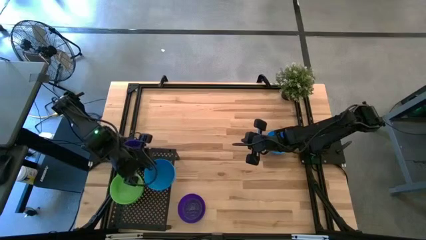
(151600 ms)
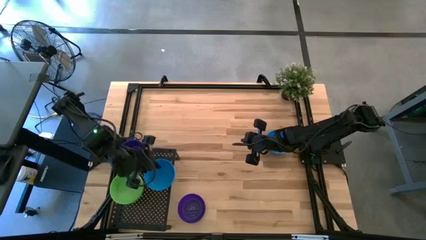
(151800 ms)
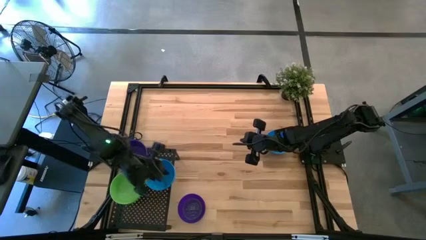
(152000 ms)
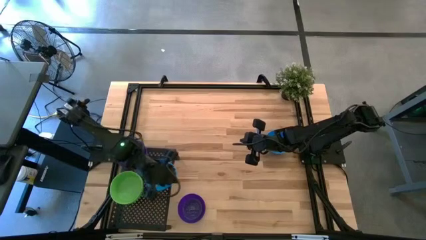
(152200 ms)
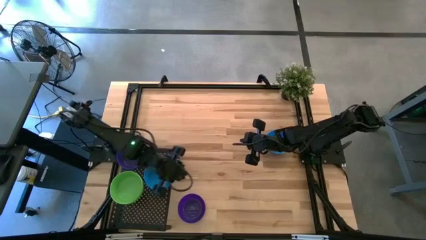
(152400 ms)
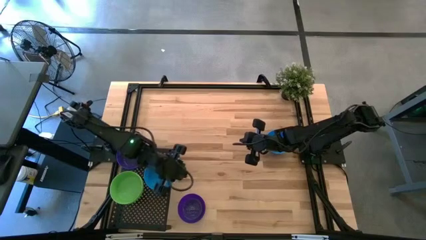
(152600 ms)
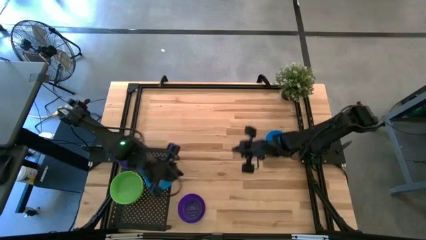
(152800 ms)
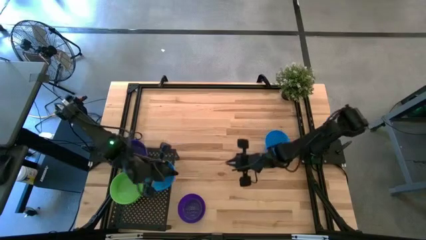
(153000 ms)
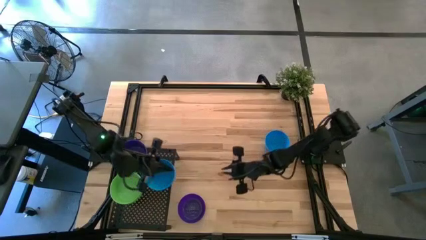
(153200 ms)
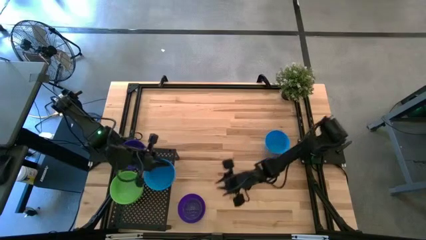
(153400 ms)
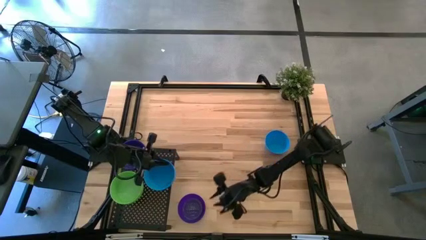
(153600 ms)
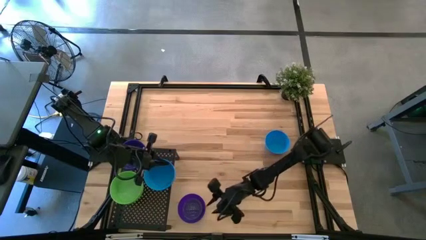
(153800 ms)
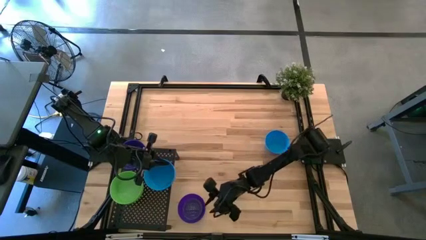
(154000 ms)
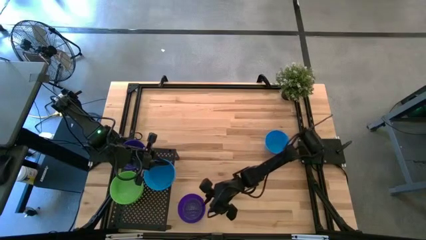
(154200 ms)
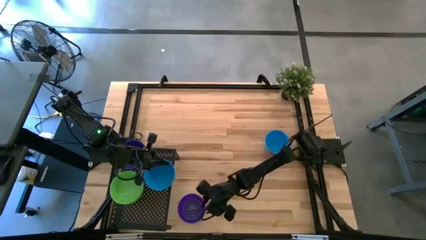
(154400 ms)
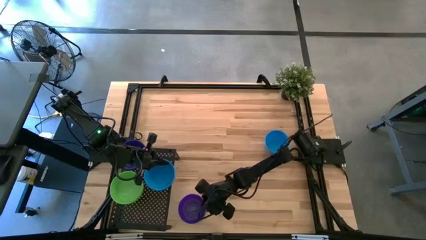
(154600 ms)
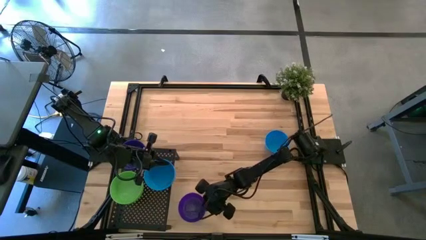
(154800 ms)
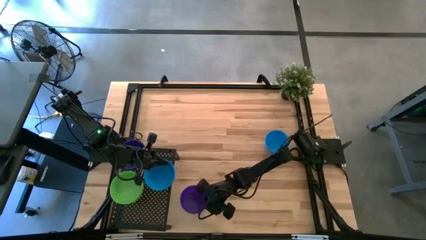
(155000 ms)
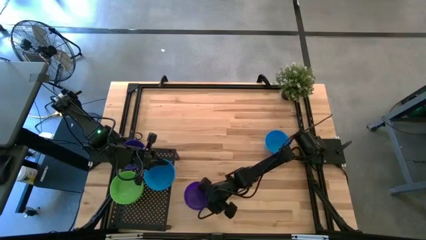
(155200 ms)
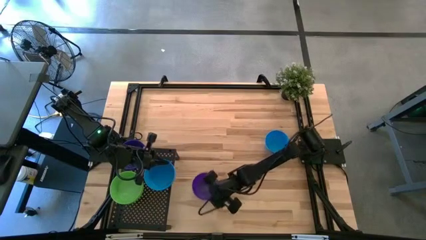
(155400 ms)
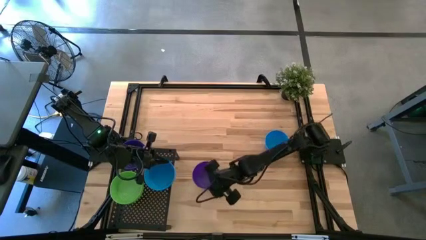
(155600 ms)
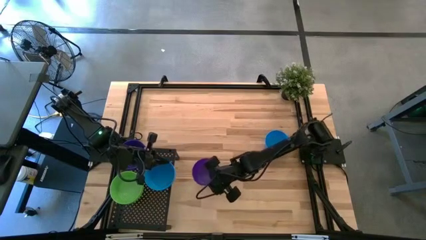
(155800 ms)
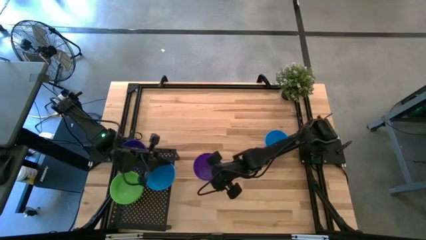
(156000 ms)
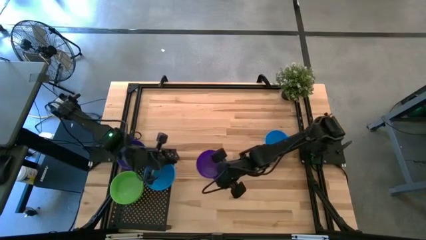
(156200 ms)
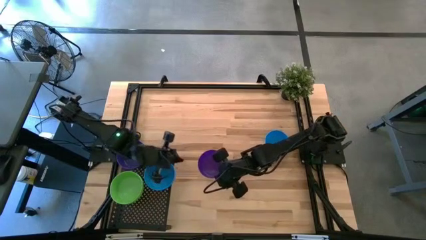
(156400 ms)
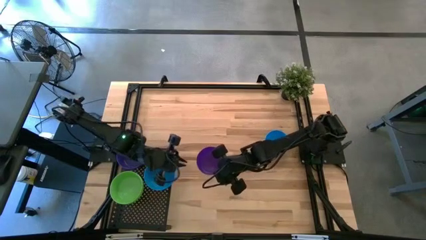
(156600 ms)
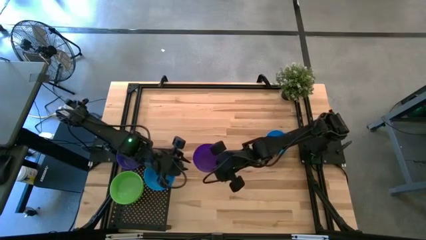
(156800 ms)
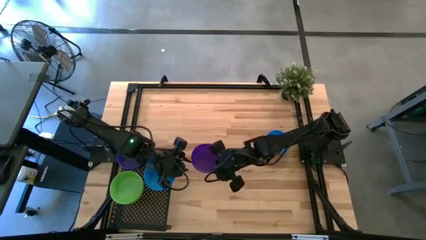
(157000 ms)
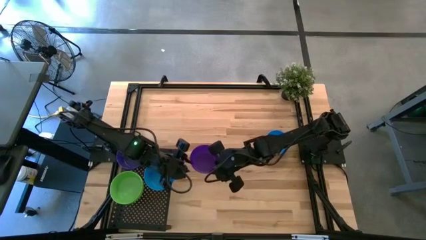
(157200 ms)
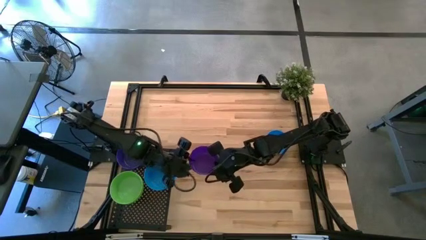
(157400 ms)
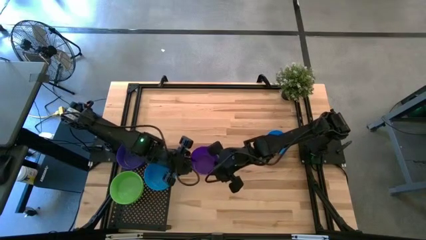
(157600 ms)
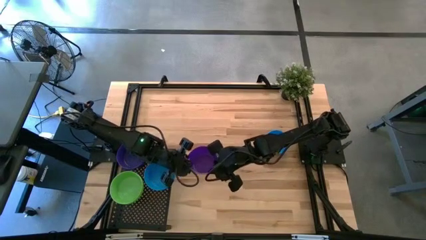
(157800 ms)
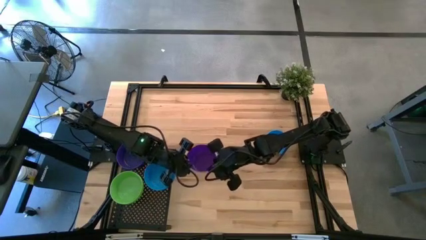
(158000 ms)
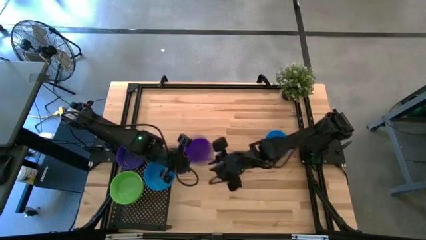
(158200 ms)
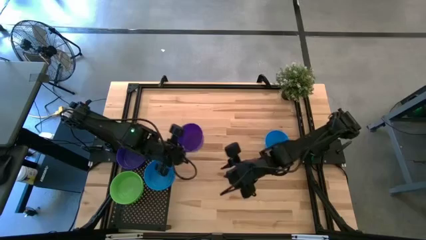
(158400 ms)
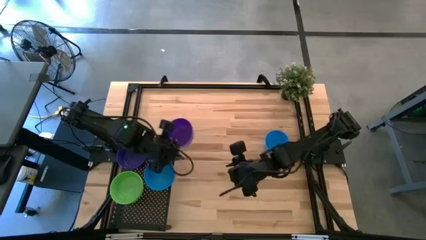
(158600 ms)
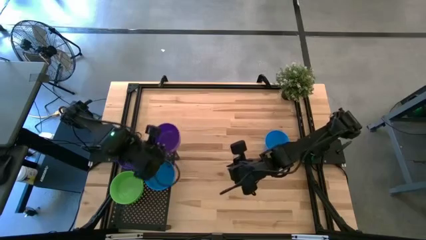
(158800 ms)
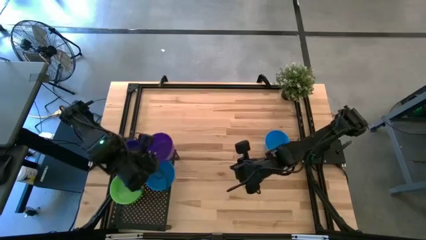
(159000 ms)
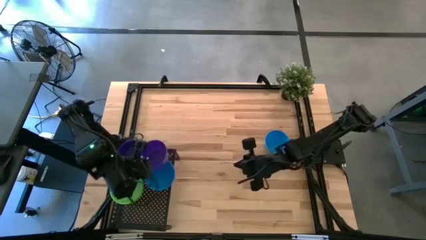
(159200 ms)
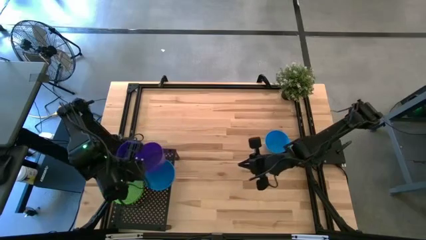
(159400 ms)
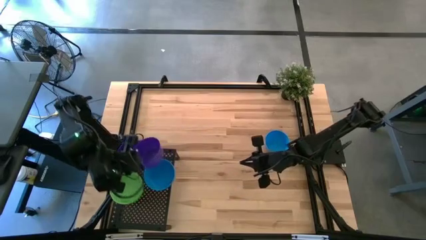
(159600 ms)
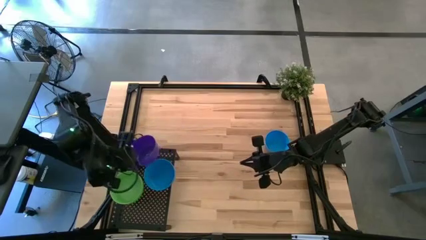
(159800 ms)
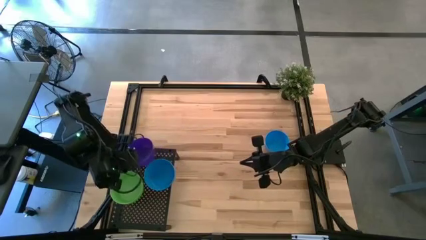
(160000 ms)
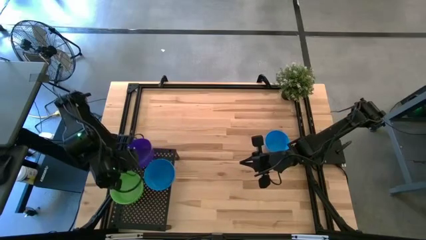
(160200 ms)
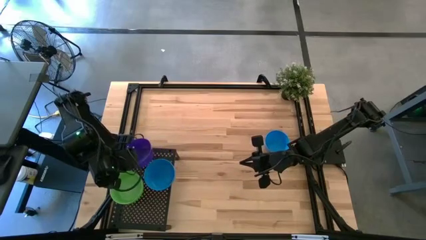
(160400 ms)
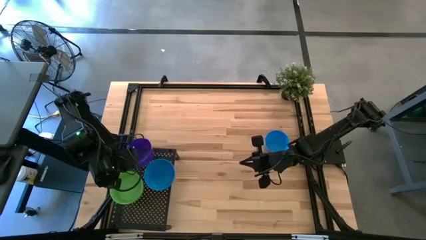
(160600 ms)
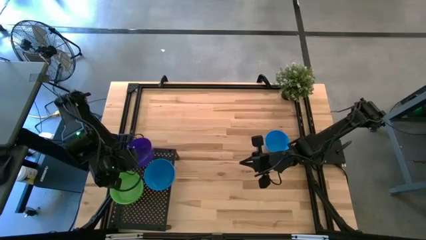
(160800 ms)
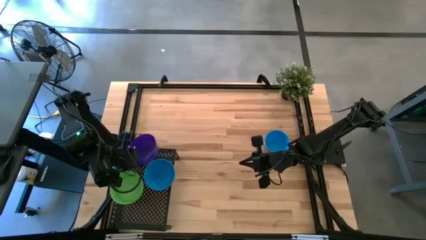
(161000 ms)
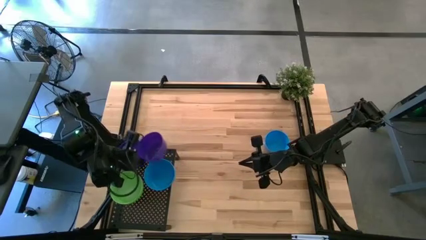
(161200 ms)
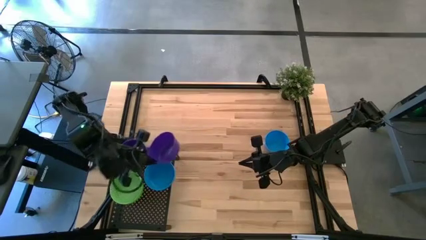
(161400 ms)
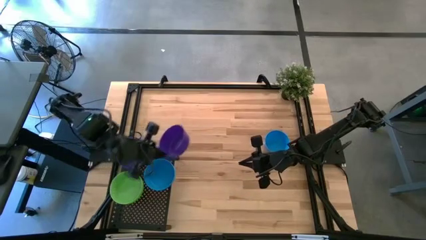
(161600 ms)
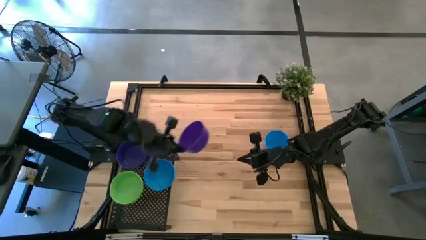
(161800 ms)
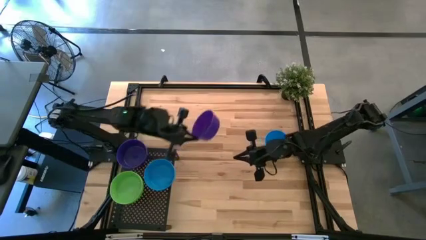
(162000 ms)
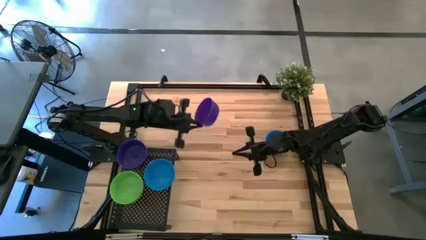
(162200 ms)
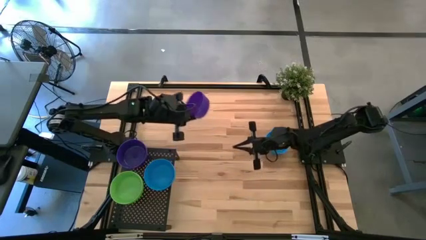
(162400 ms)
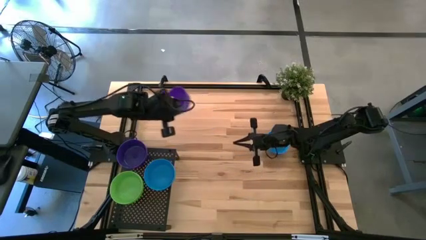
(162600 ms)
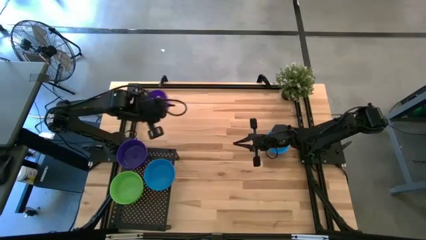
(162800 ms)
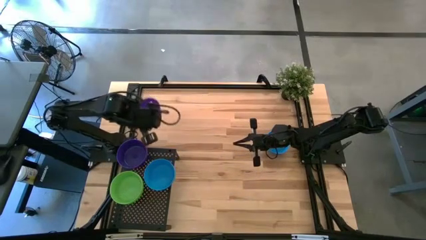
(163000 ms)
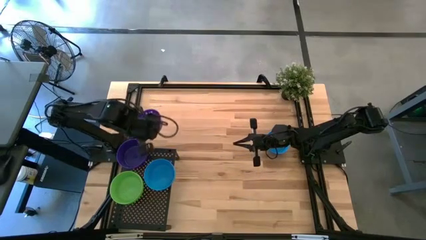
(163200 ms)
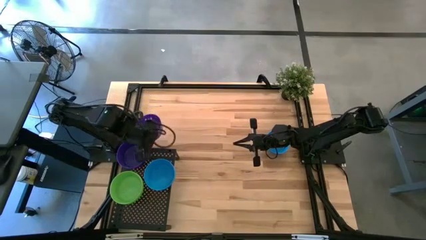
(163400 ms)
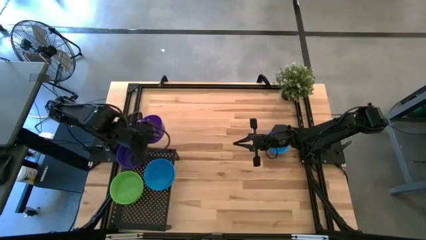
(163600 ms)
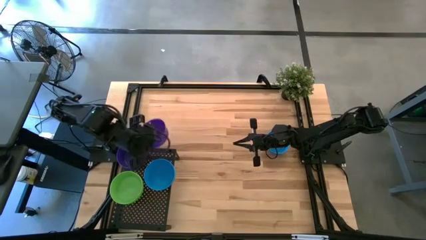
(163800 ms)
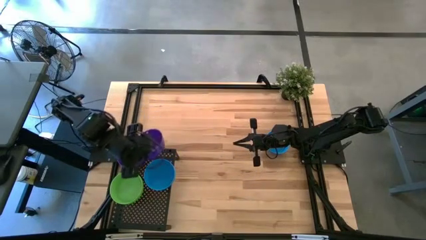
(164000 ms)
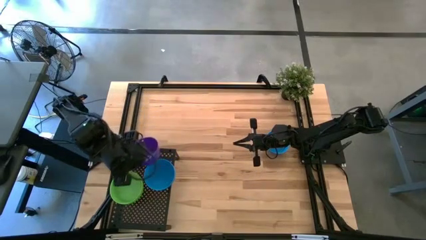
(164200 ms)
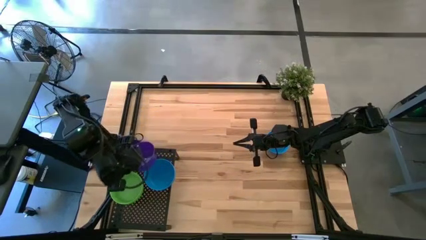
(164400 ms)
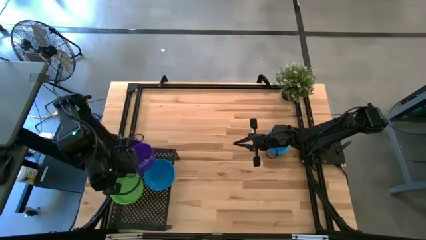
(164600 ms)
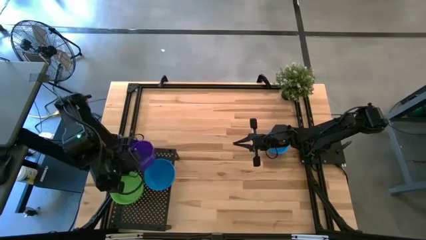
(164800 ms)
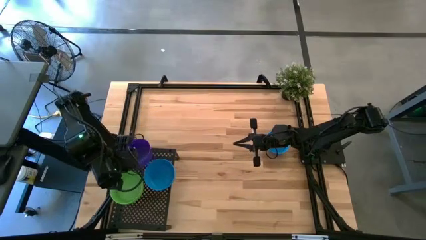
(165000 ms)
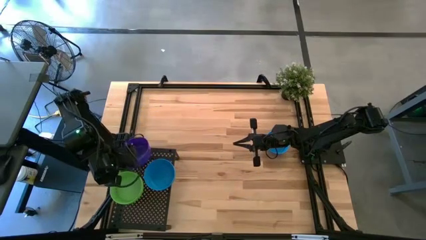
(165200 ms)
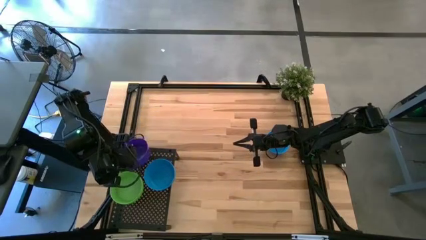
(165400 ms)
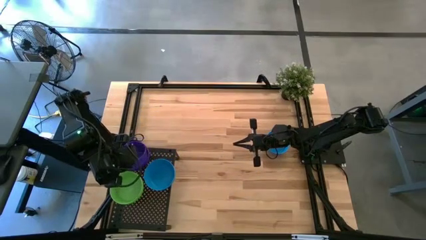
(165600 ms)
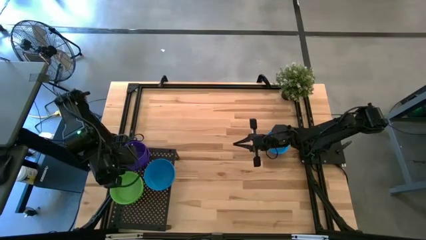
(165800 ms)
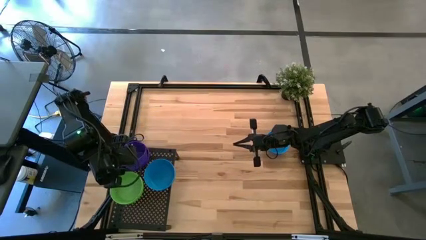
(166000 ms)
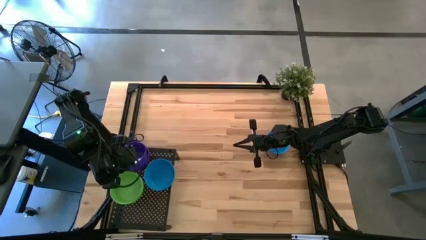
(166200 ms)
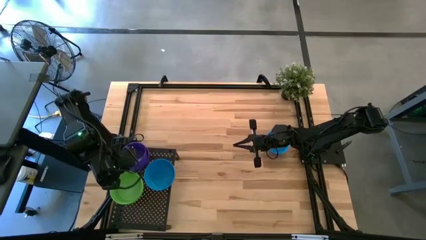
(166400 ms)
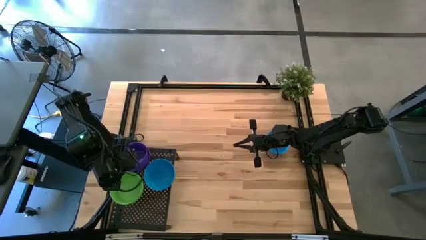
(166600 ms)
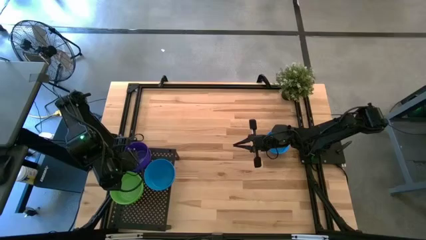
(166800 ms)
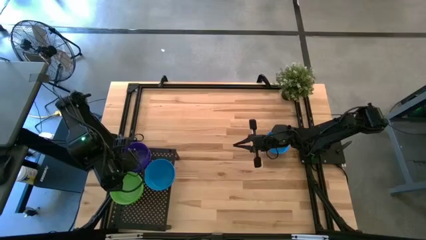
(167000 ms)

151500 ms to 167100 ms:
Task: Pick & Place Mini bowls
Stack the violet bowl on the other violet bowls on the shelf
